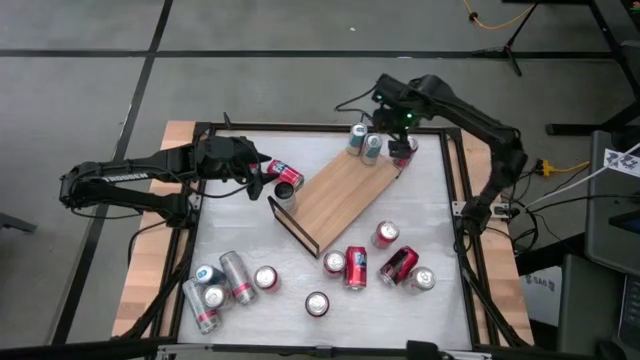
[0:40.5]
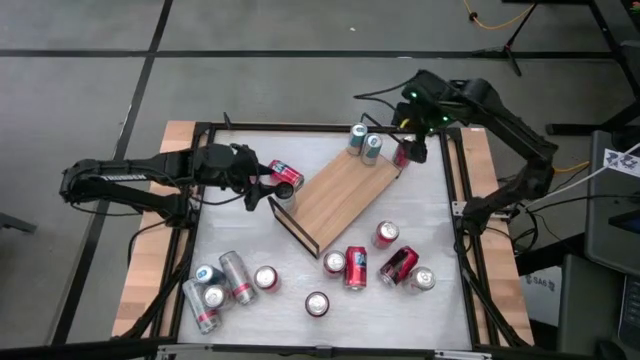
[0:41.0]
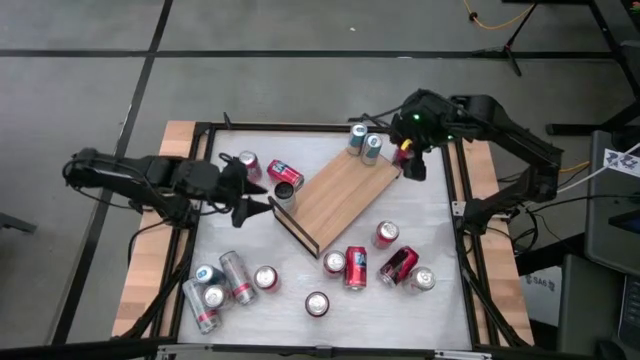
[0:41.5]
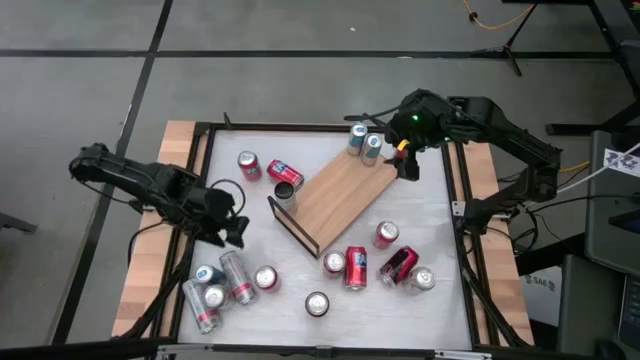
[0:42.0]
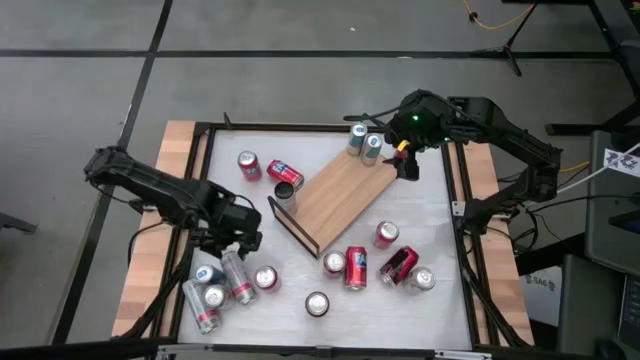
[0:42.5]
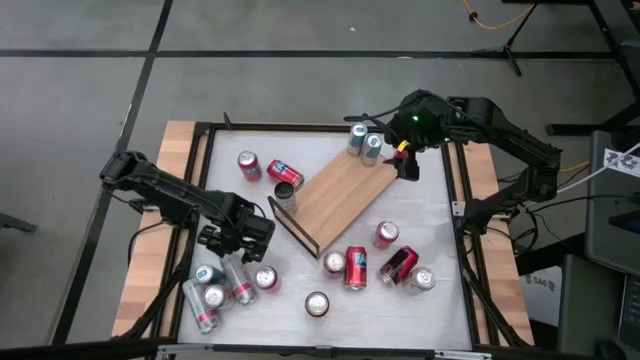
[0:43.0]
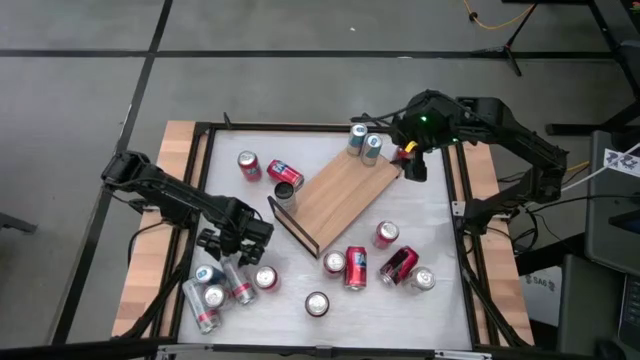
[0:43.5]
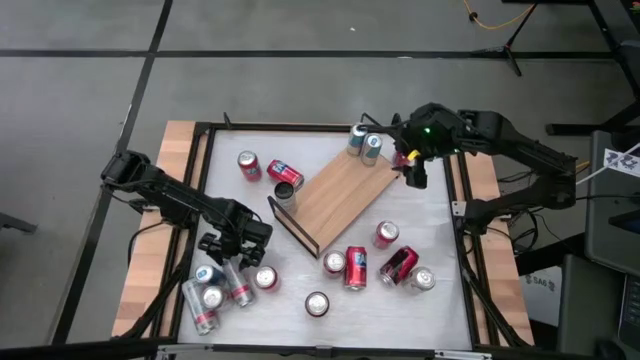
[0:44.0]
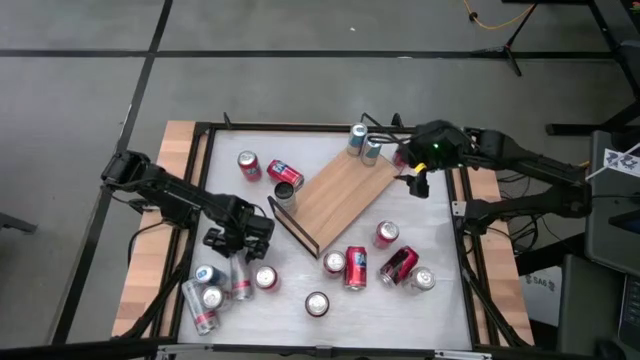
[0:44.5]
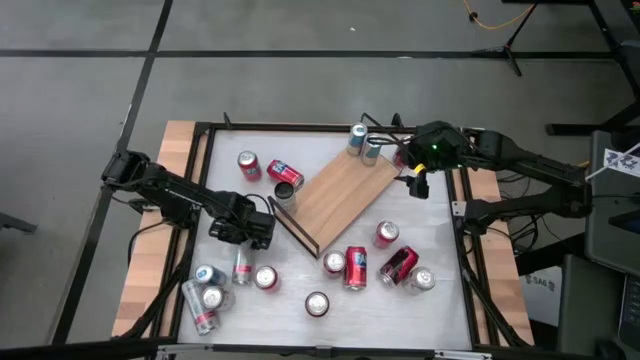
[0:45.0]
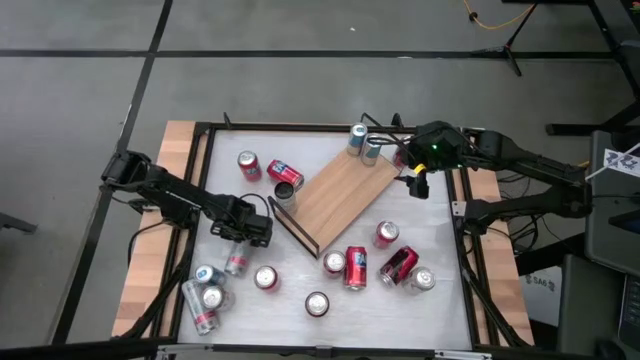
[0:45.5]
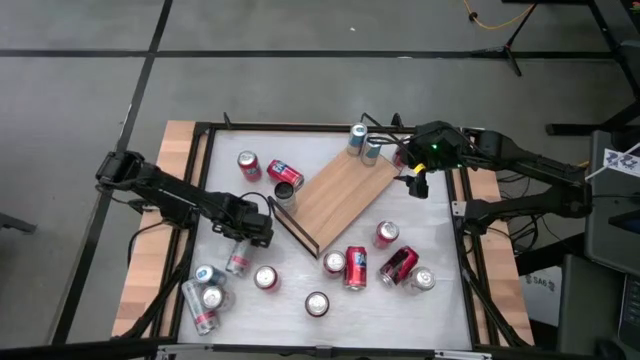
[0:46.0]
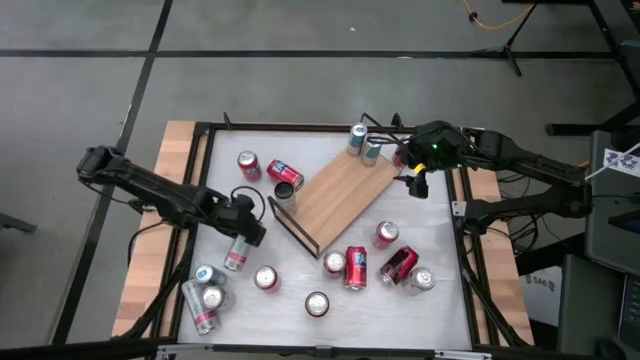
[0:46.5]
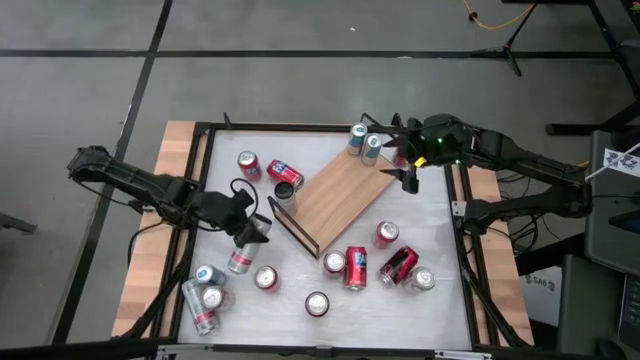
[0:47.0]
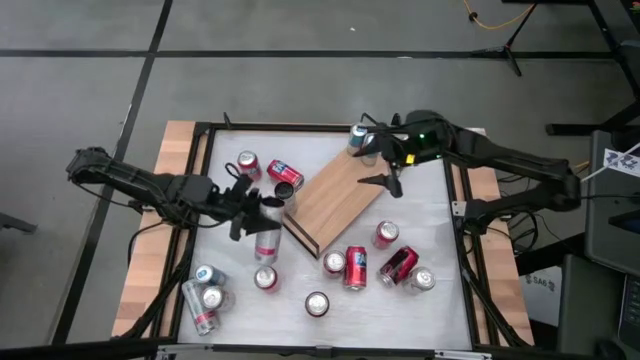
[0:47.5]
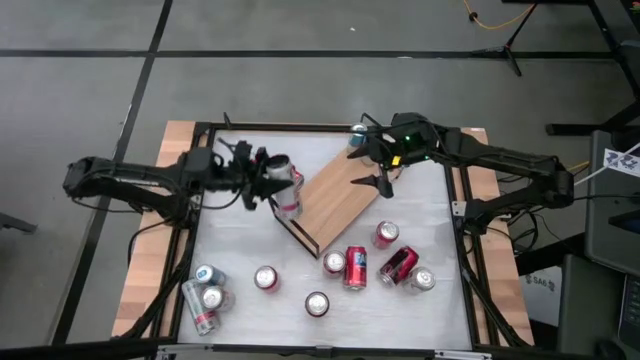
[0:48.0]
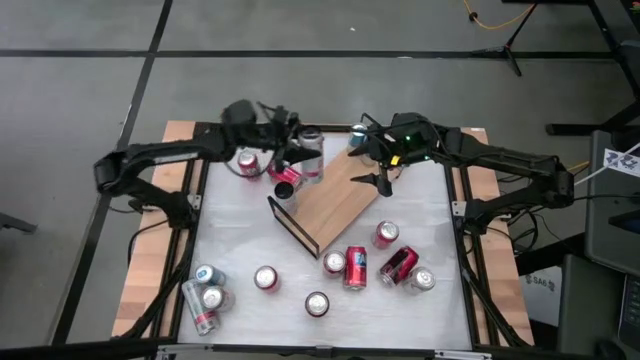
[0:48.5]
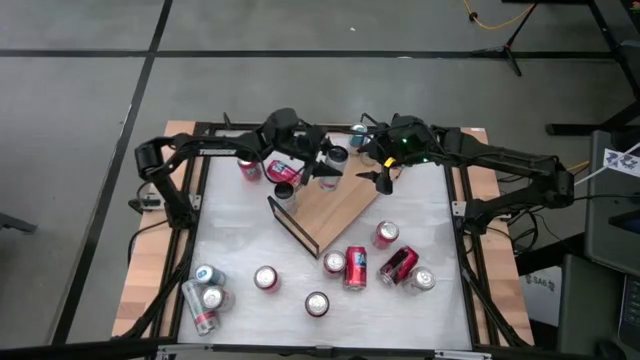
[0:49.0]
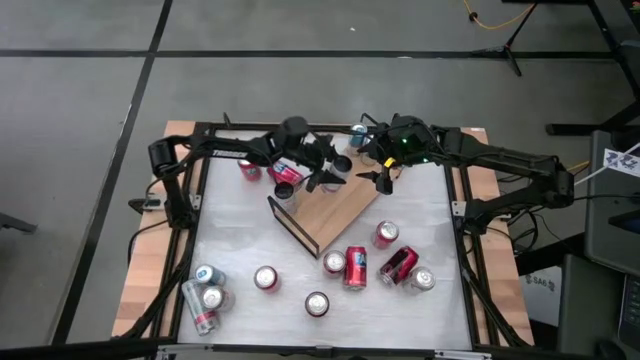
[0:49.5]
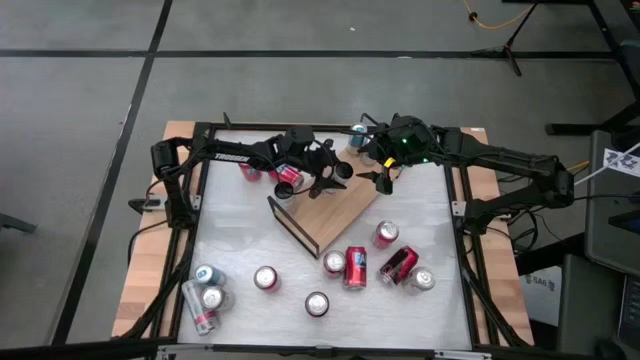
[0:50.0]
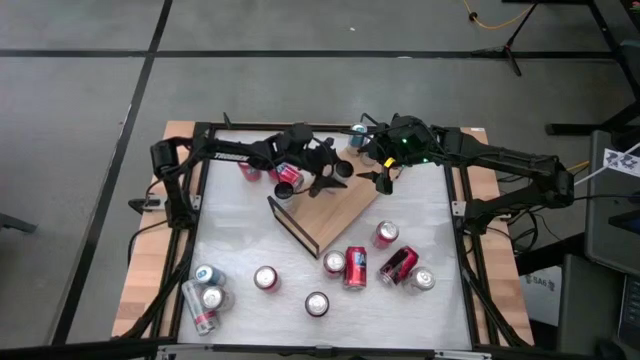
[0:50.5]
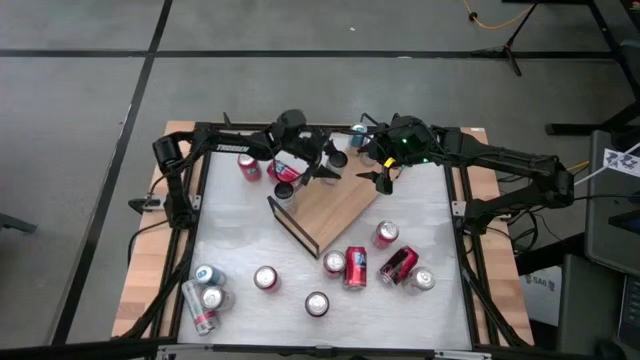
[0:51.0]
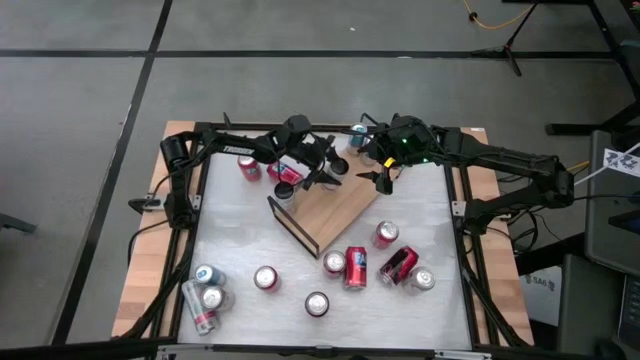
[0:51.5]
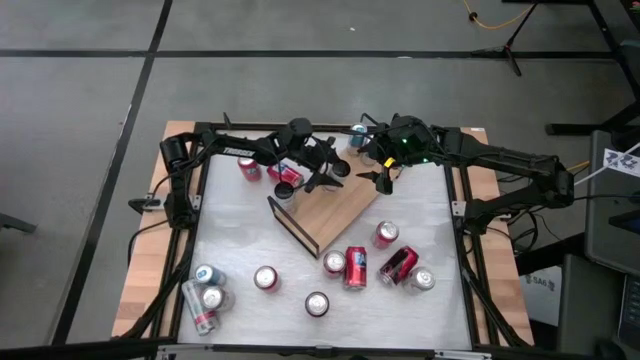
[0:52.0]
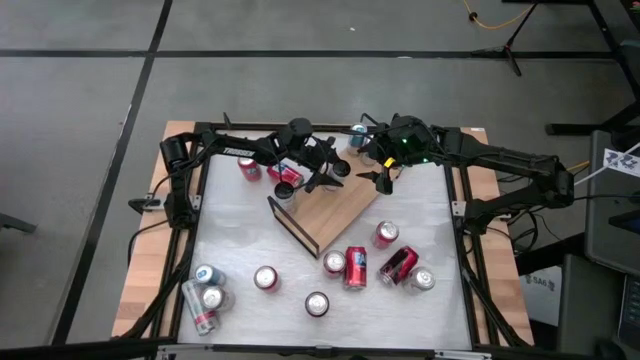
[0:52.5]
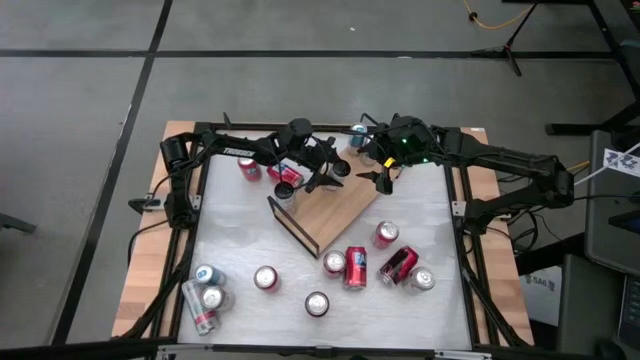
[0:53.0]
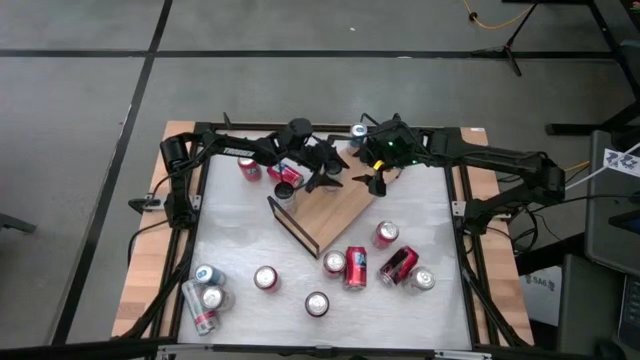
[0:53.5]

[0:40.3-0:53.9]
Task: Place canned beverage on shelf
Put the white pink soda can on the shelf aligned with the other white pink soda can

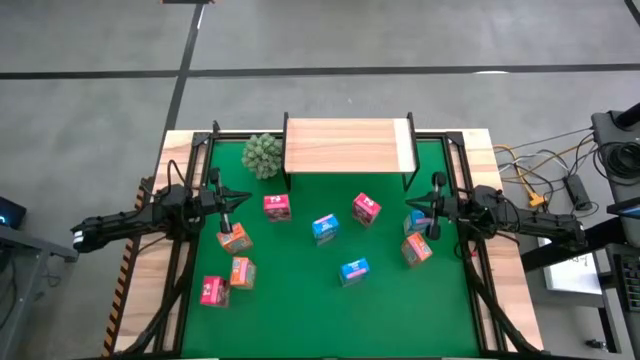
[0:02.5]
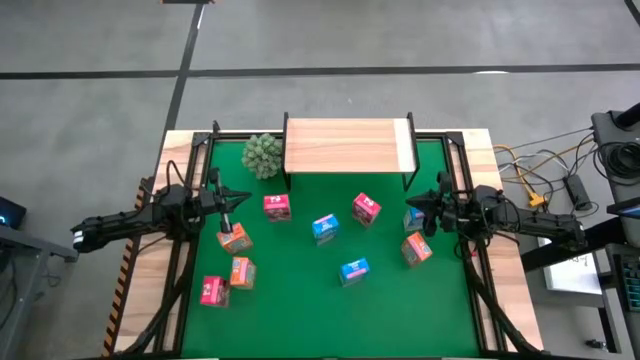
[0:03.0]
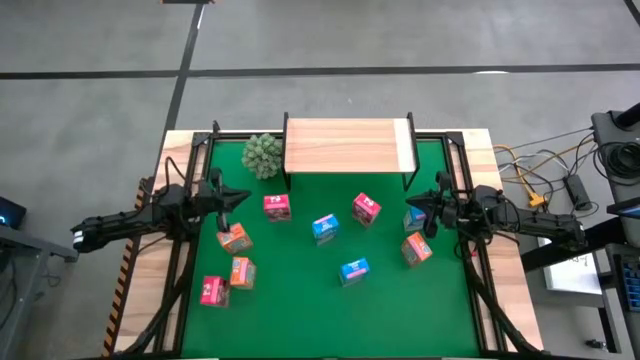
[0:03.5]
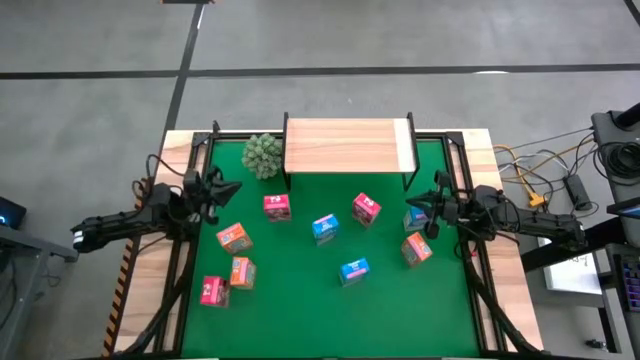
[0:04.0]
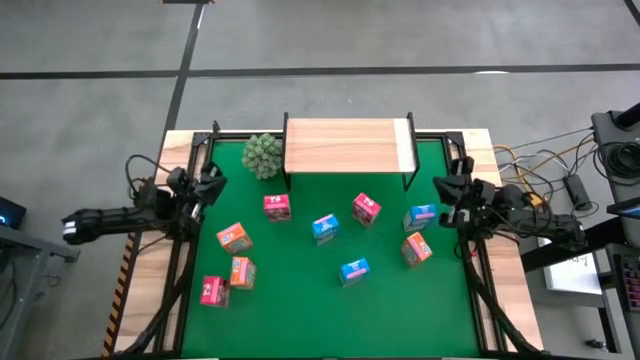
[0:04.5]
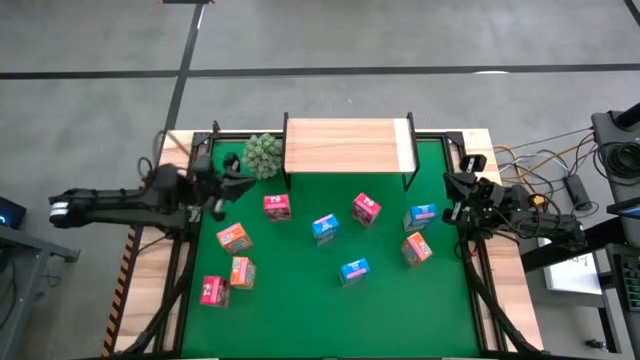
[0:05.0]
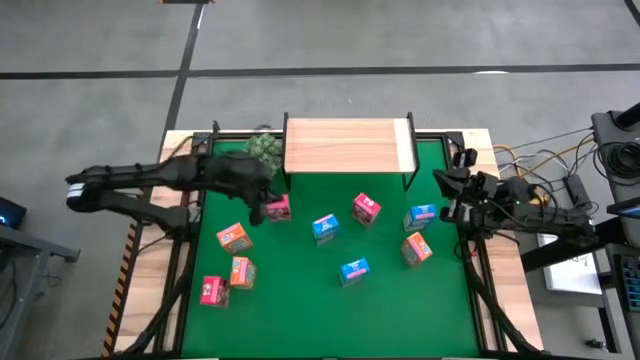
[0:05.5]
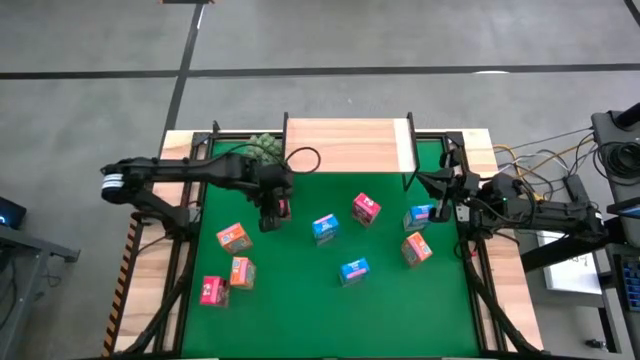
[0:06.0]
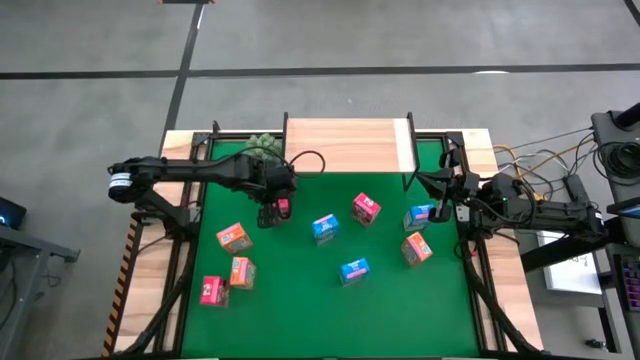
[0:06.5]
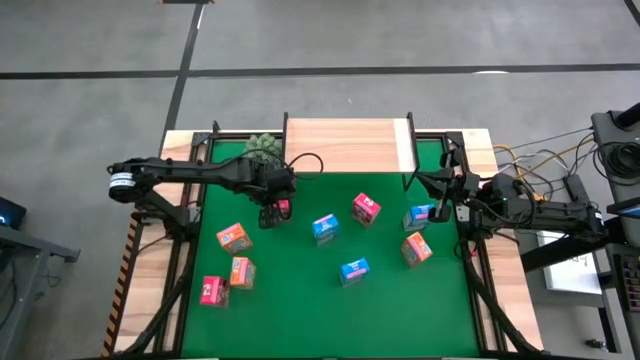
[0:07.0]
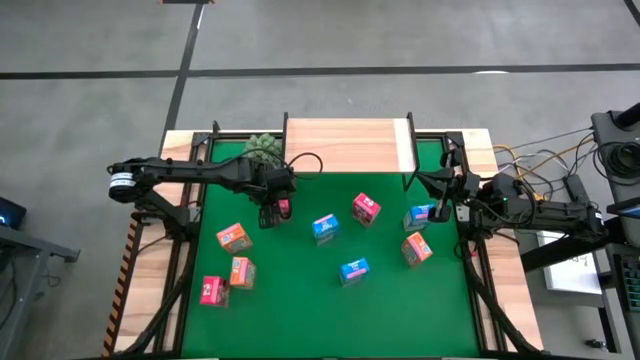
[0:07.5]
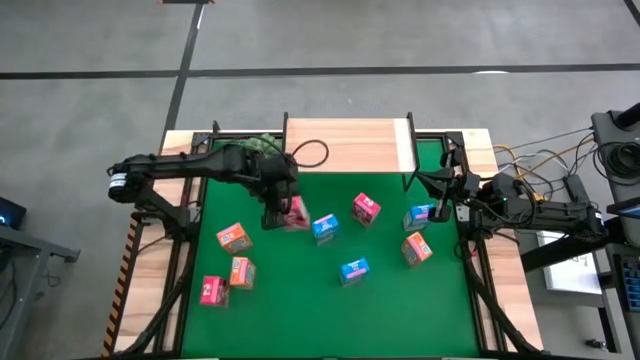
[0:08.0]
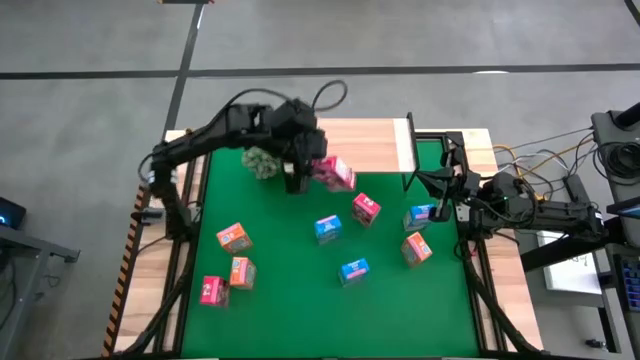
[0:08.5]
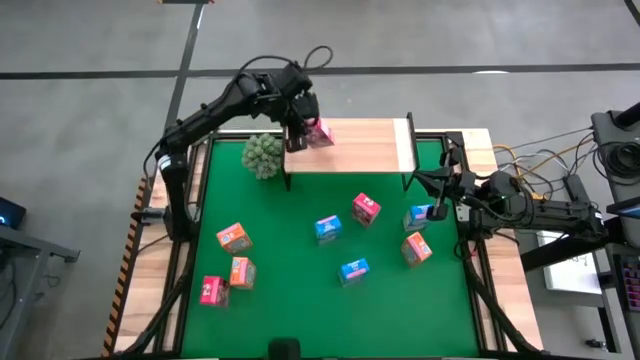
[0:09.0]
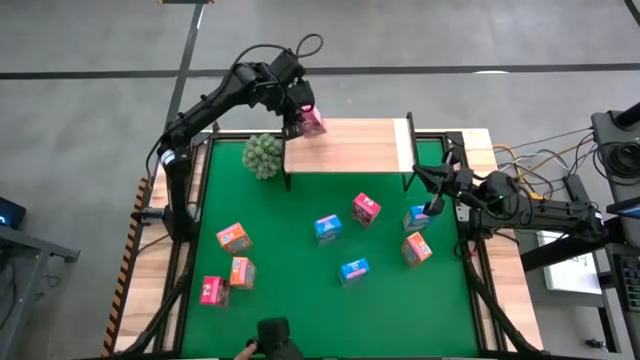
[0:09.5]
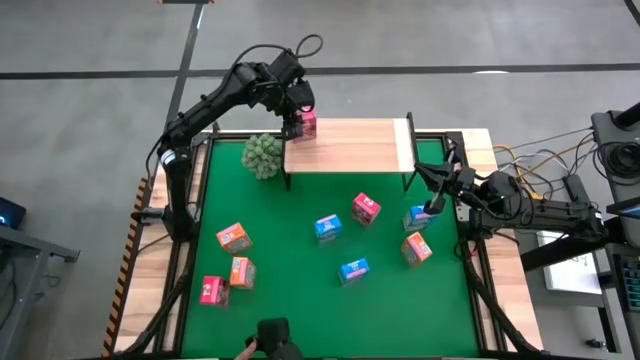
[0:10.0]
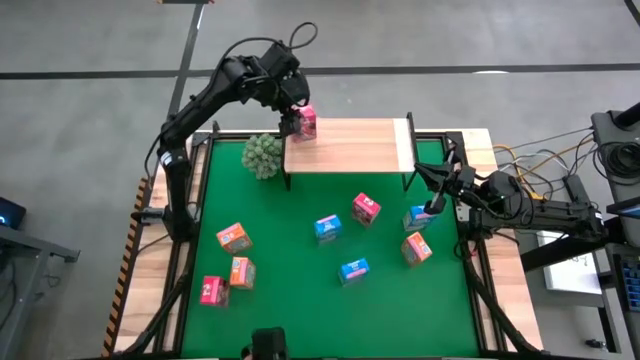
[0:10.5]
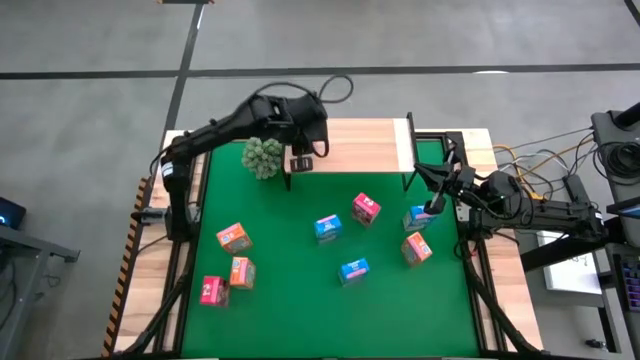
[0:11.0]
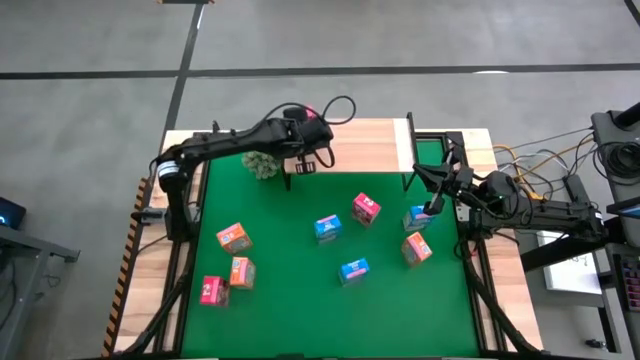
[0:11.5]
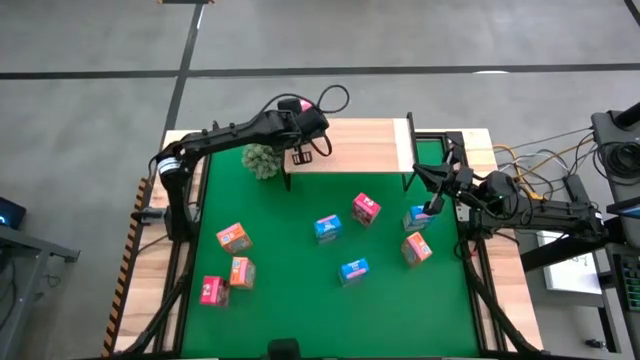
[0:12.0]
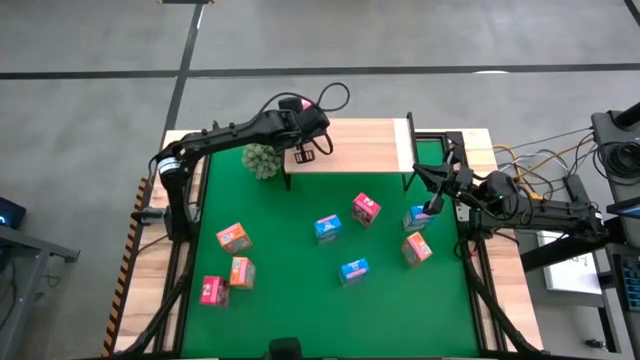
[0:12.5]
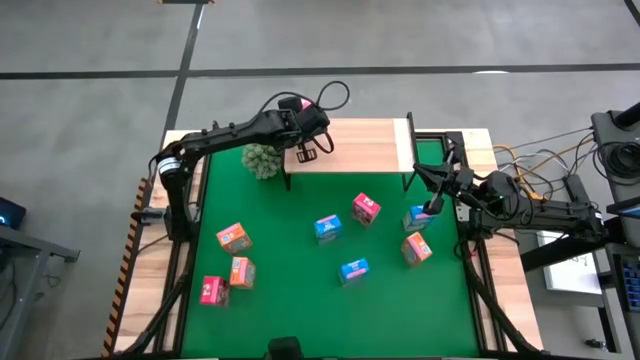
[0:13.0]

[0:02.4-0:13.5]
Task: Stack cereal on shelf
Put the top center red cereal box on the shelf
